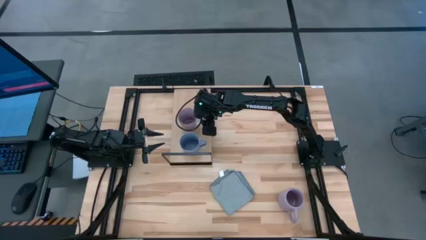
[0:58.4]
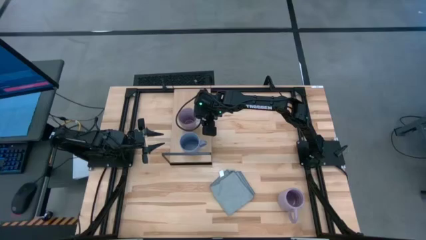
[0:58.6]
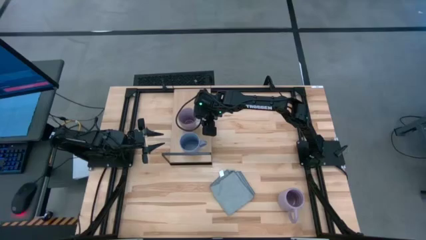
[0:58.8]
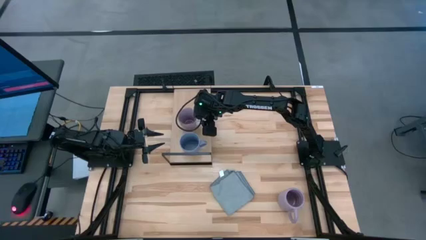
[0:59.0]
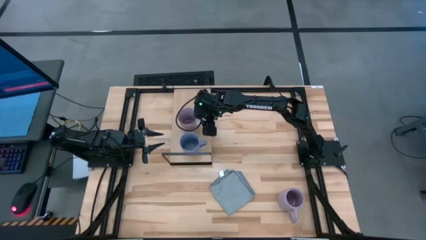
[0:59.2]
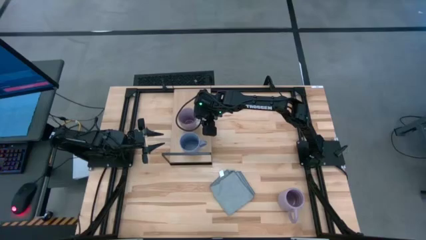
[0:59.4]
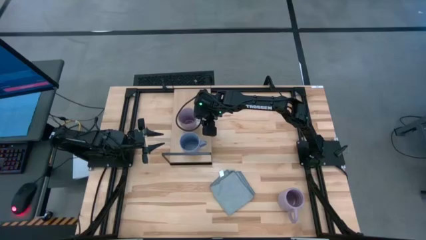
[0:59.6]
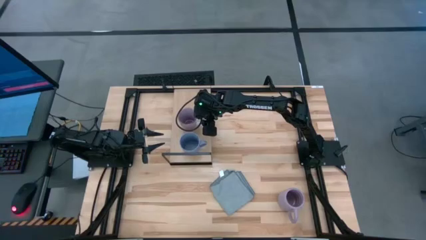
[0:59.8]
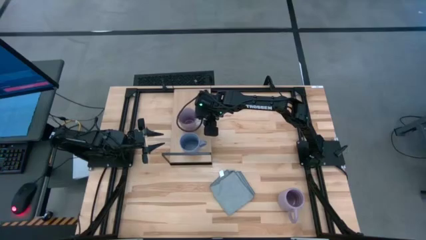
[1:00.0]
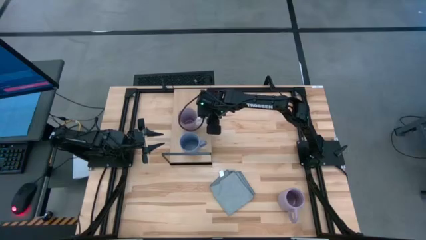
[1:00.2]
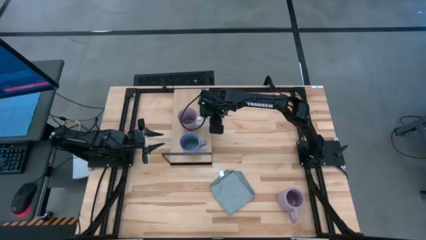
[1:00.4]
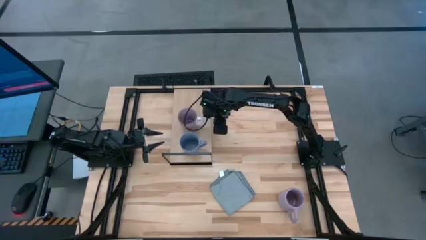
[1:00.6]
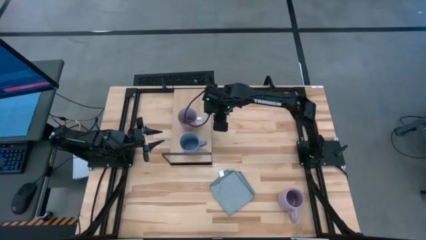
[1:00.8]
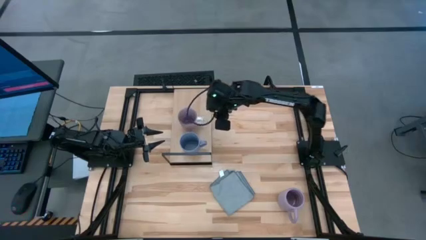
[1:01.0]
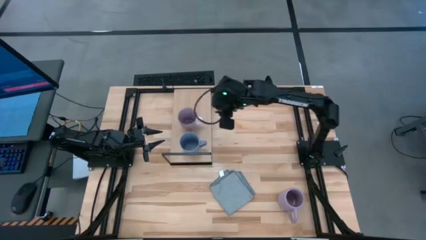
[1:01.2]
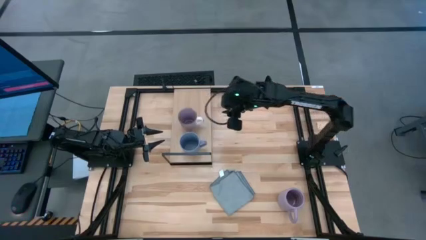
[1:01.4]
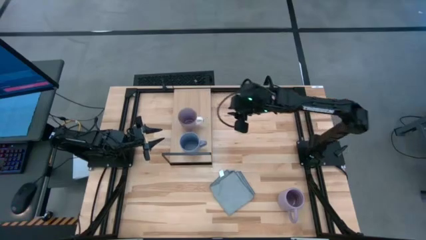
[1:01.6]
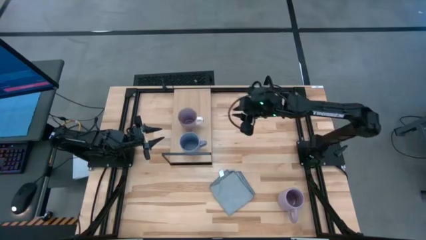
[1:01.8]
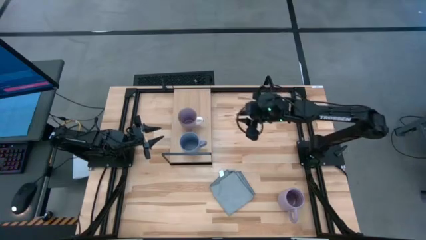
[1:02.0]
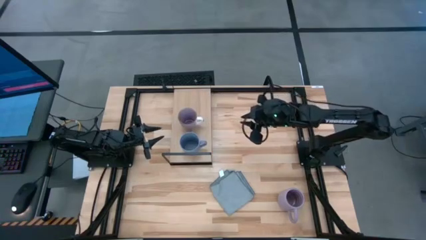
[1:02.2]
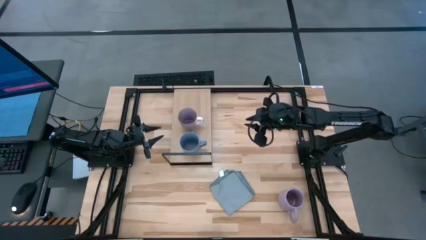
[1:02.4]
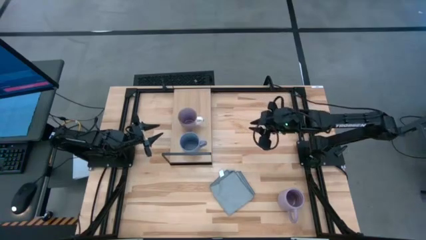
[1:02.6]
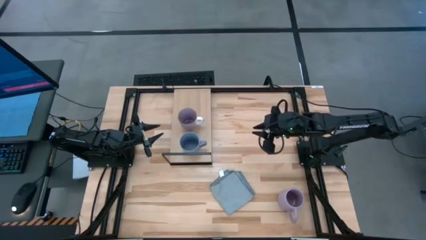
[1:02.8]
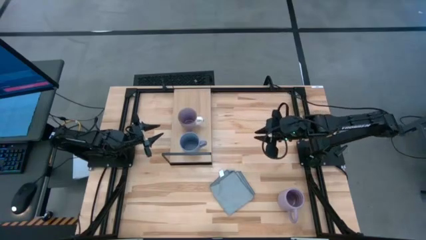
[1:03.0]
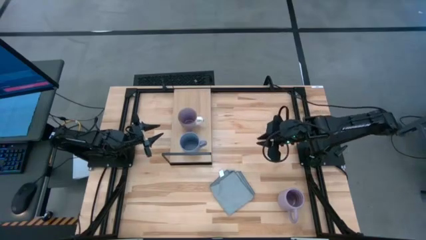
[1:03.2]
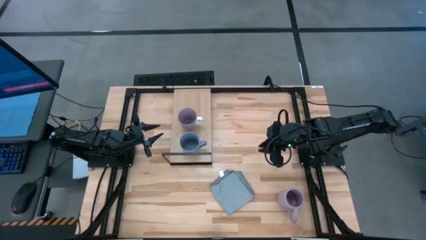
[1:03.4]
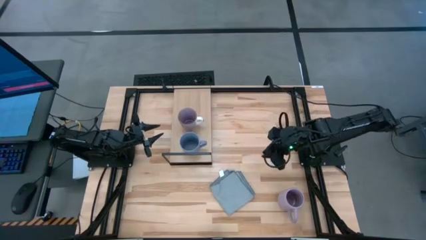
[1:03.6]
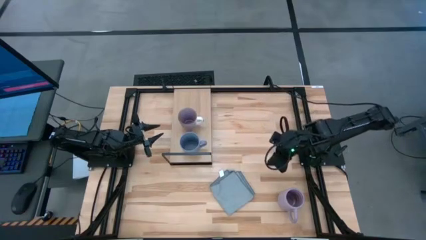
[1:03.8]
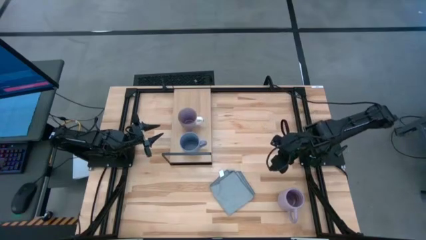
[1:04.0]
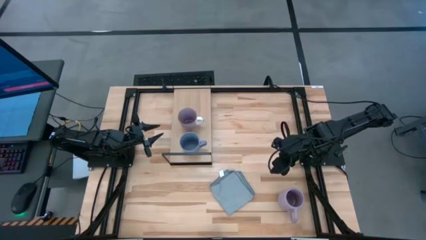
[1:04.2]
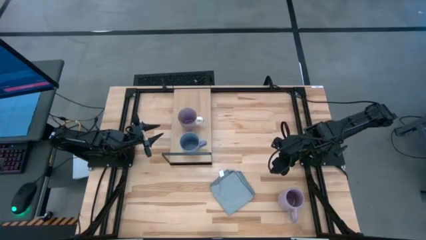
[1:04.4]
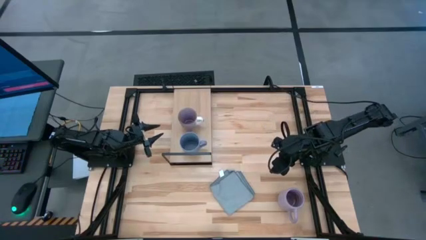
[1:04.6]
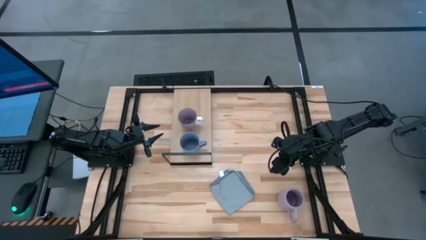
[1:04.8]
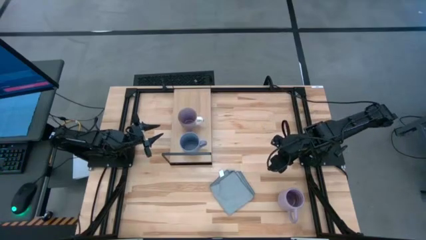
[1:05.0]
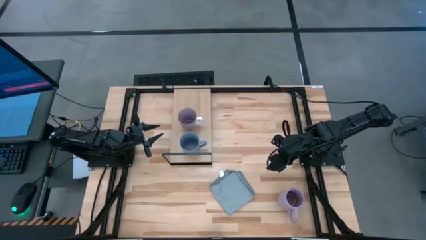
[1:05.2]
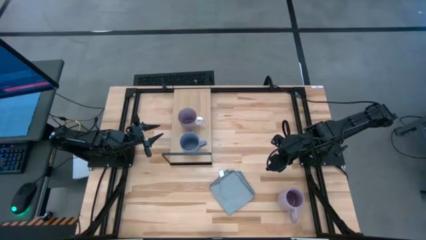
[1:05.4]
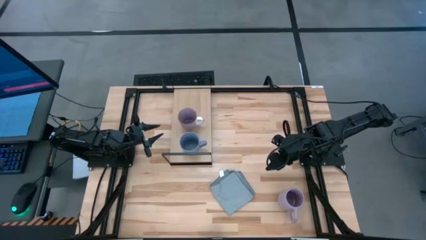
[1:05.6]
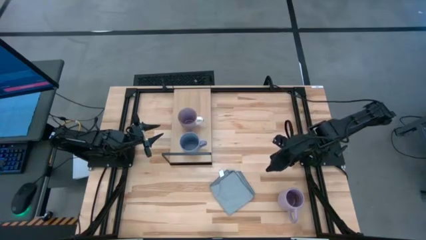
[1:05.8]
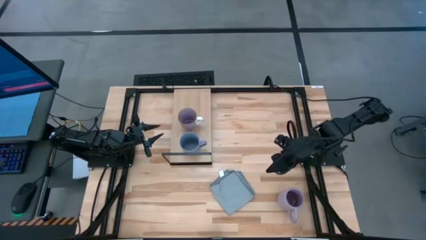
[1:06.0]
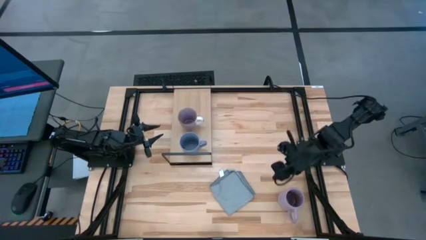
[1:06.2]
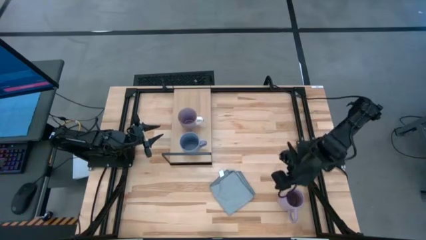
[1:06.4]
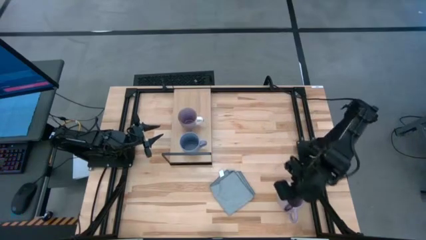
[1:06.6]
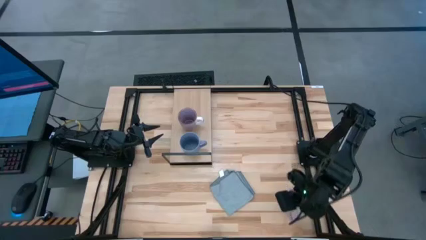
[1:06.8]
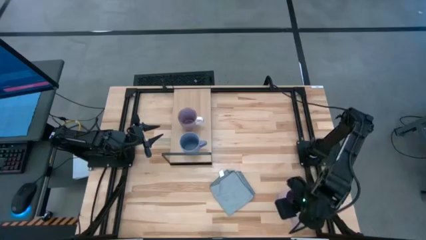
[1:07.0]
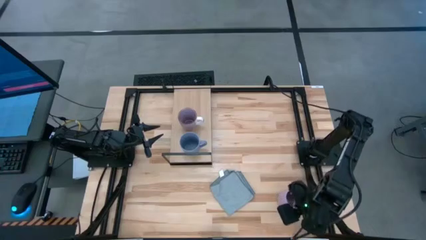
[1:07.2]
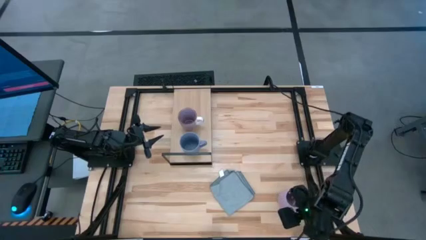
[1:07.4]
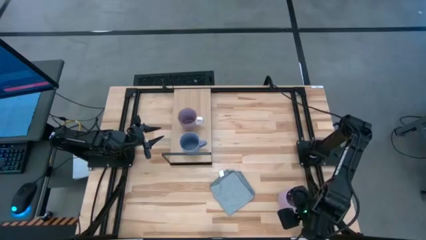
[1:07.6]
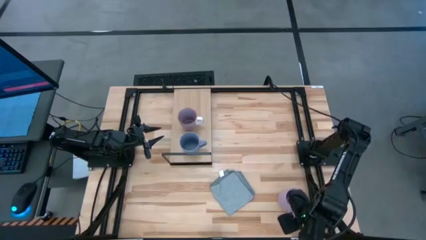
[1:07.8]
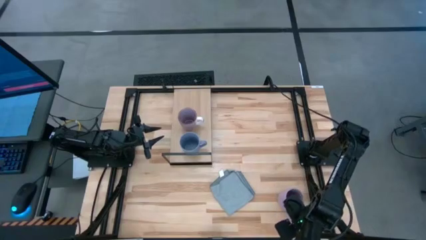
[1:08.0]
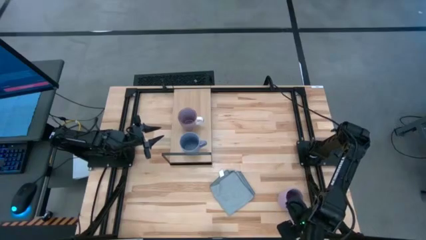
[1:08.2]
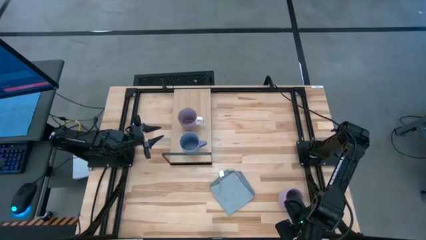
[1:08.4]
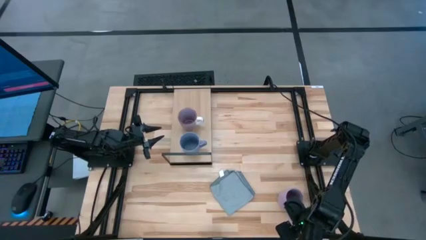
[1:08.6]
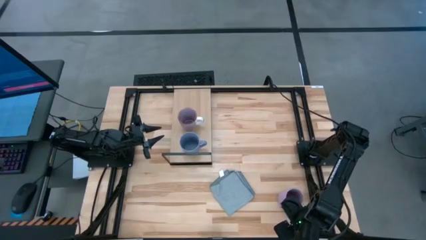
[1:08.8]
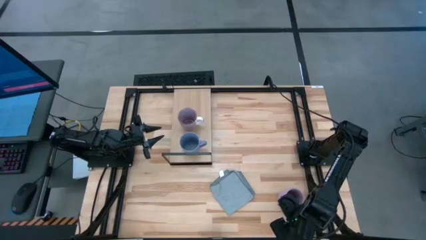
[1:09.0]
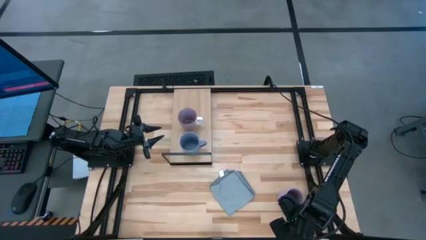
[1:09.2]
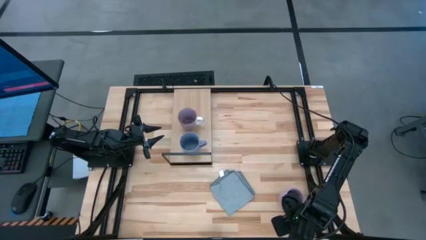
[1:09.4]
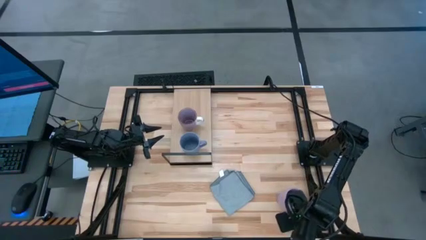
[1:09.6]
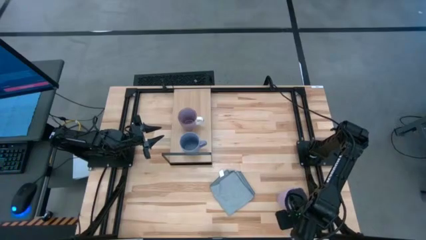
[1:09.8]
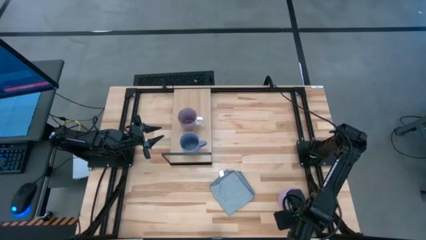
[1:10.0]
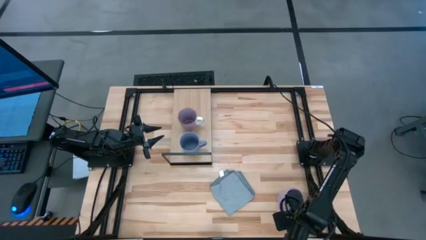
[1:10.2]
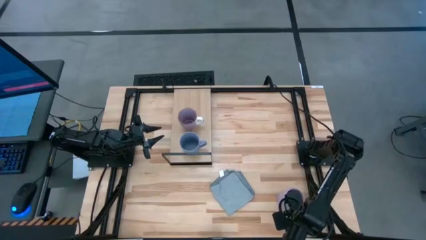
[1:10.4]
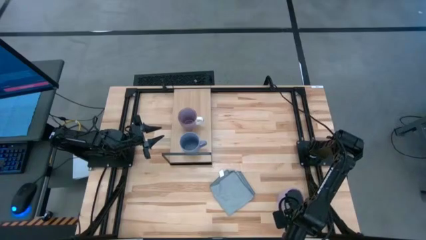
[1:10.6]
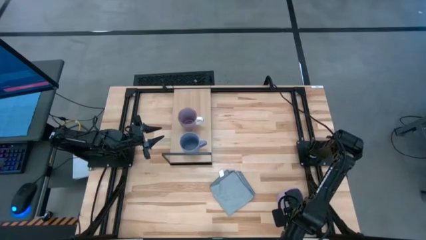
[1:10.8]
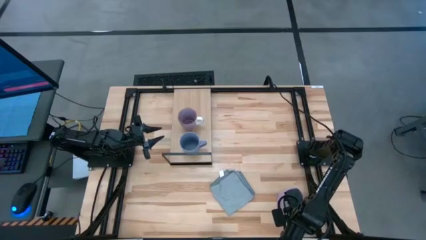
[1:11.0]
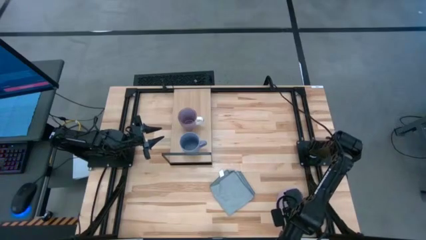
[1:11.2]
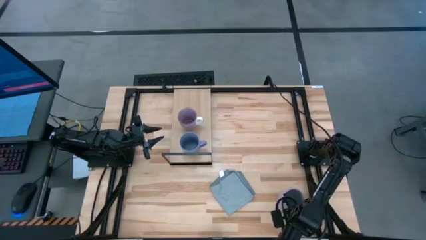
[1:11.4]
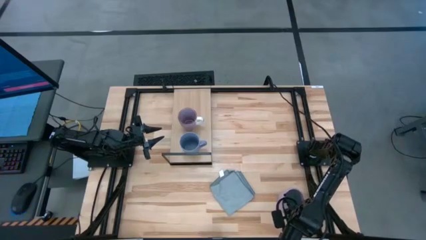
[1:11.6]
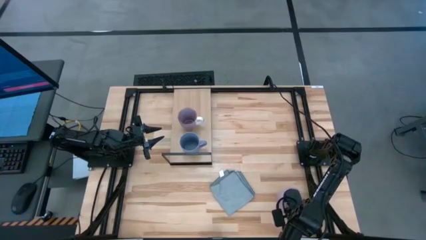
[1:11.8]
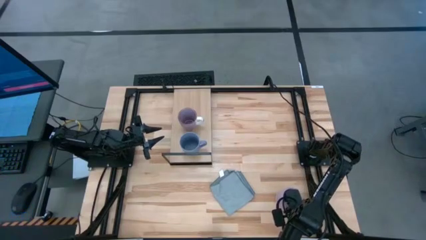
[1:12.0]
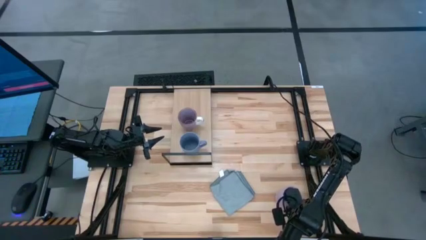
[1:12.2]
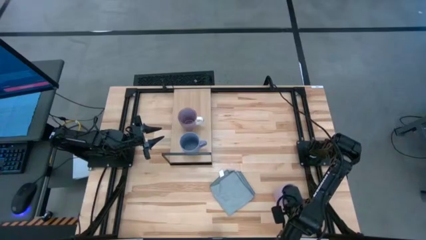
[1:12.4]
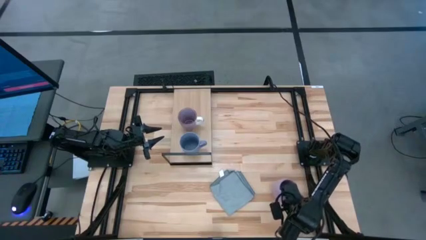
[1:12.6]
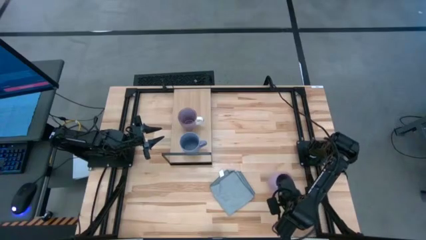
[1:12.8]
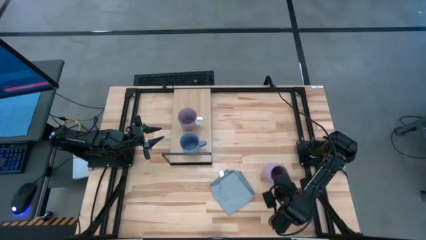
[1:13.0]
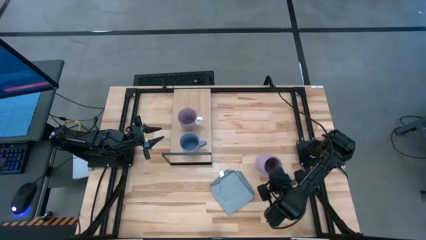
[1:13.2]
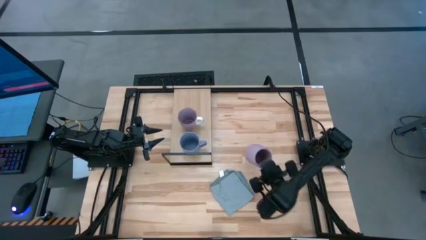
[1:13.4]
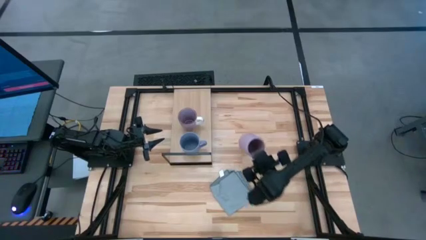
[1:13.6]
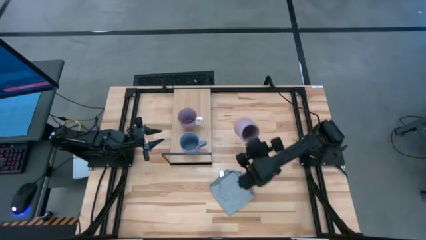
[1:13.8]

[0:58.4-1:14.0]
Task: Stack small to large cups/mugs on shelf
Put the light purple cup on the shelf
